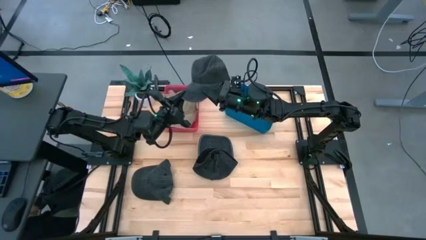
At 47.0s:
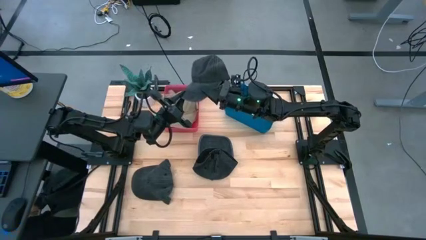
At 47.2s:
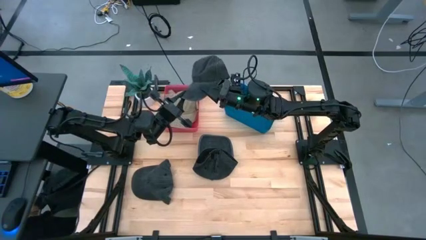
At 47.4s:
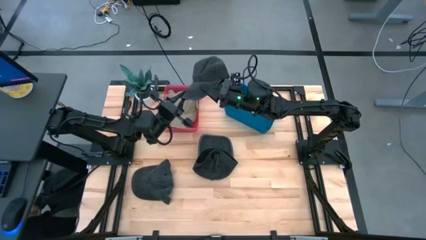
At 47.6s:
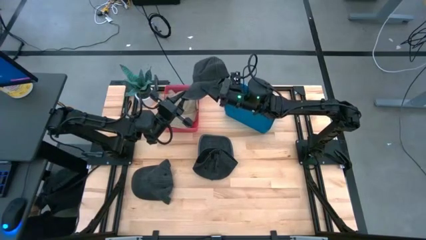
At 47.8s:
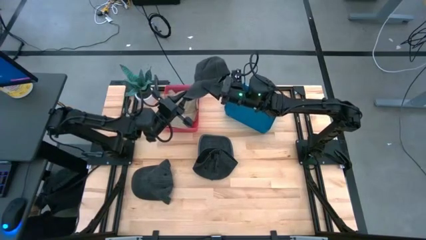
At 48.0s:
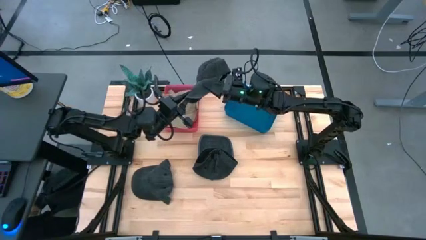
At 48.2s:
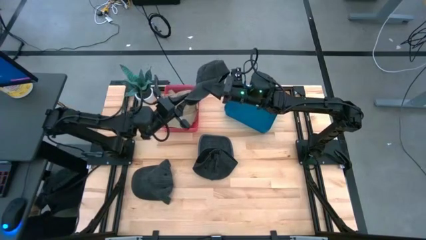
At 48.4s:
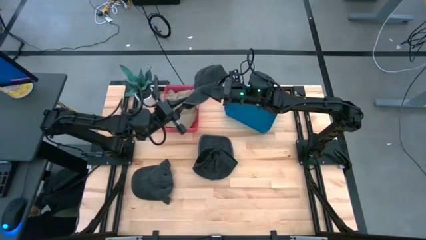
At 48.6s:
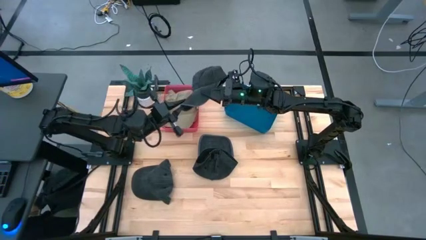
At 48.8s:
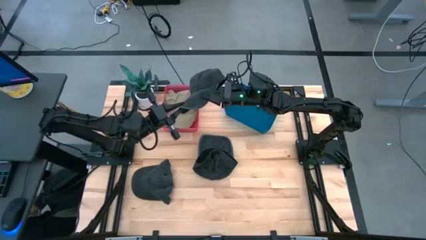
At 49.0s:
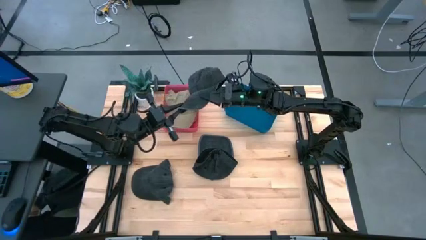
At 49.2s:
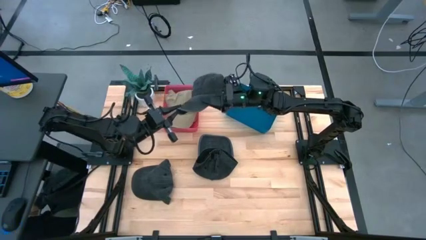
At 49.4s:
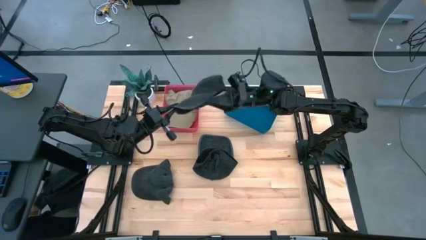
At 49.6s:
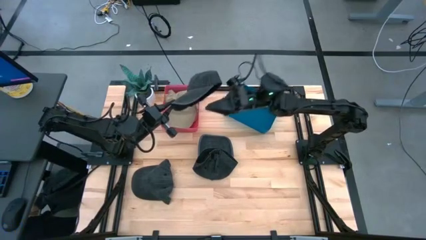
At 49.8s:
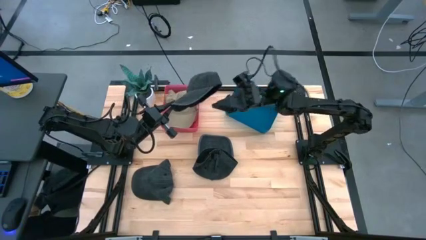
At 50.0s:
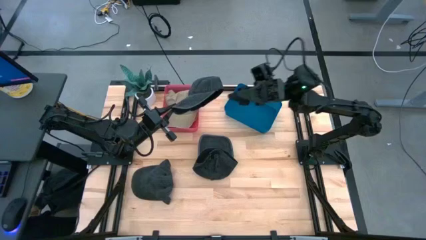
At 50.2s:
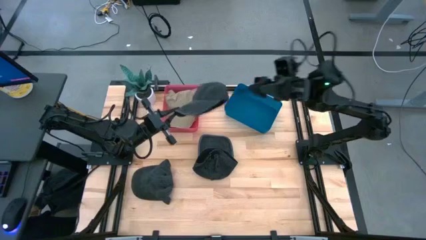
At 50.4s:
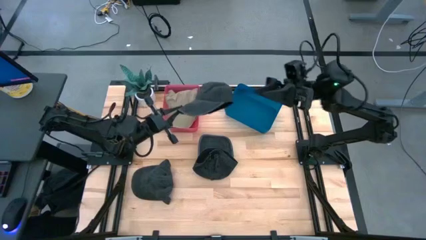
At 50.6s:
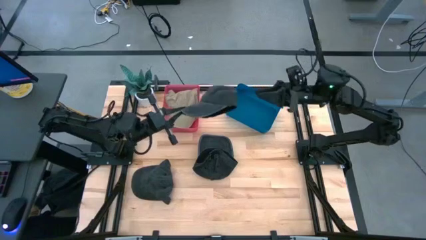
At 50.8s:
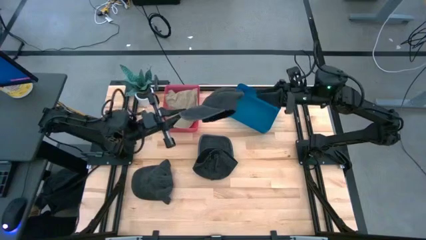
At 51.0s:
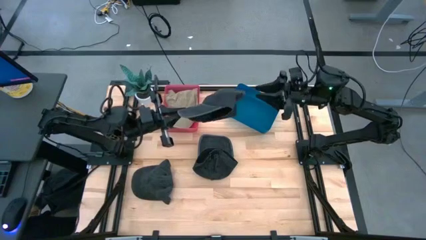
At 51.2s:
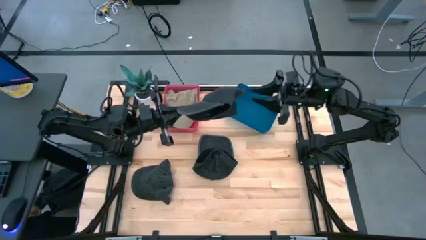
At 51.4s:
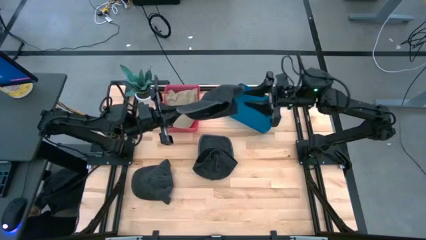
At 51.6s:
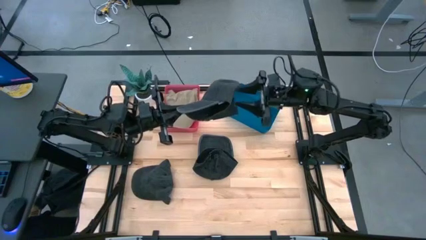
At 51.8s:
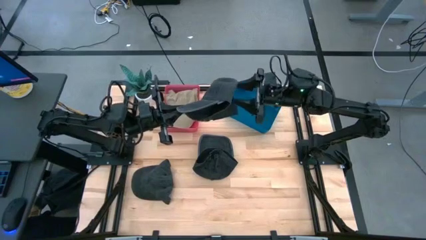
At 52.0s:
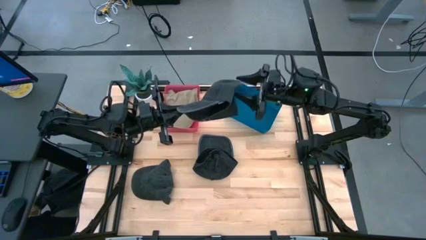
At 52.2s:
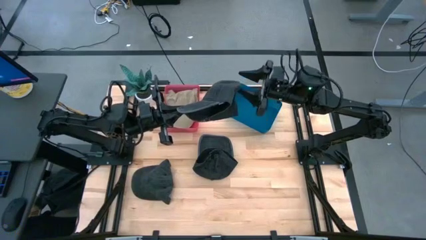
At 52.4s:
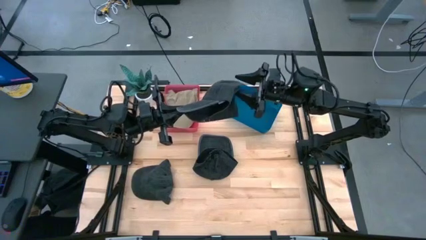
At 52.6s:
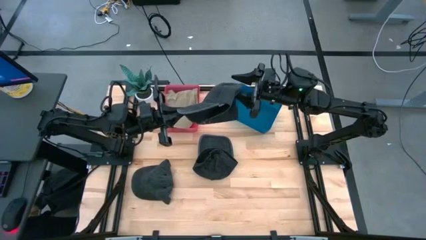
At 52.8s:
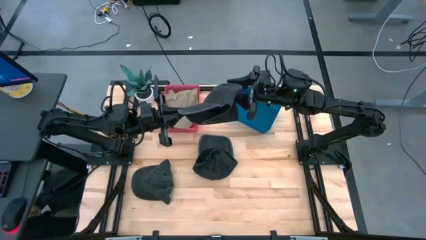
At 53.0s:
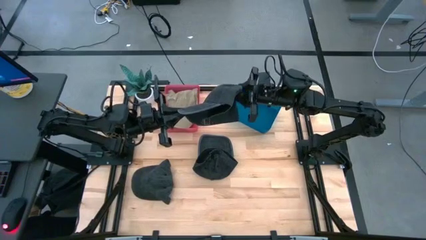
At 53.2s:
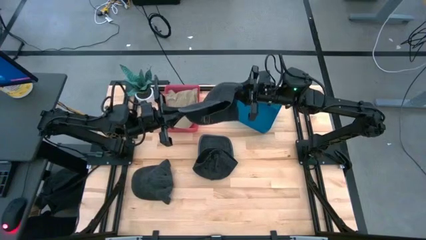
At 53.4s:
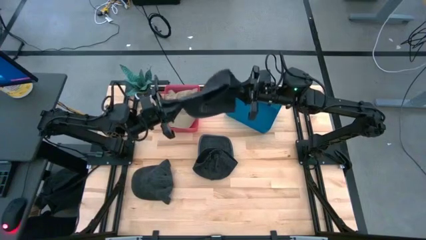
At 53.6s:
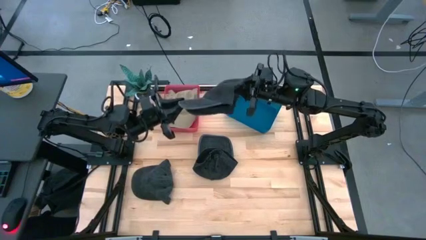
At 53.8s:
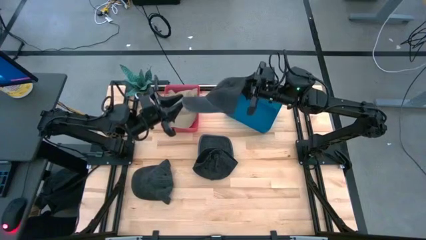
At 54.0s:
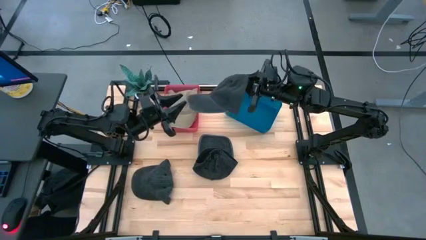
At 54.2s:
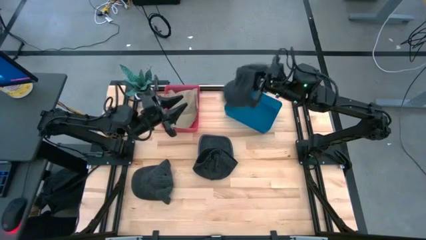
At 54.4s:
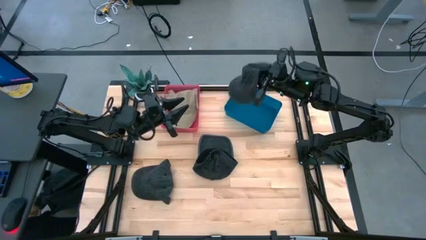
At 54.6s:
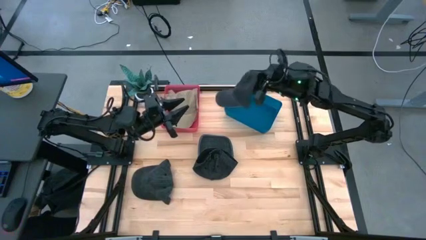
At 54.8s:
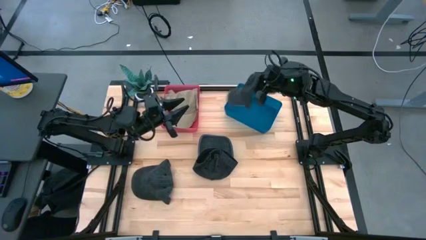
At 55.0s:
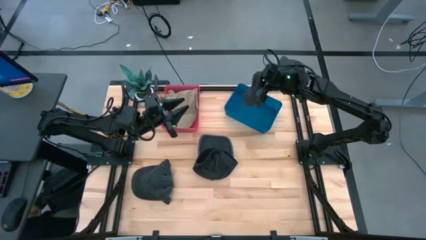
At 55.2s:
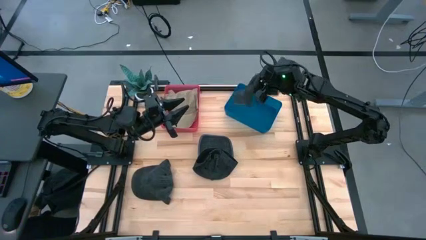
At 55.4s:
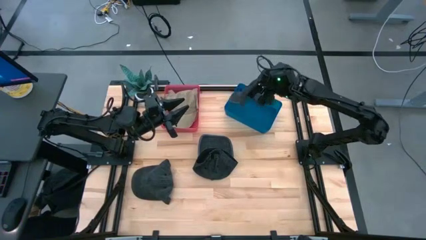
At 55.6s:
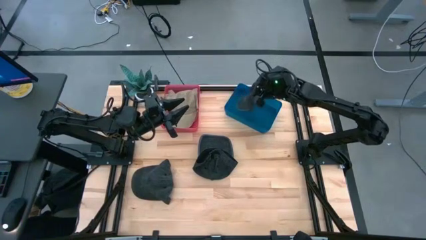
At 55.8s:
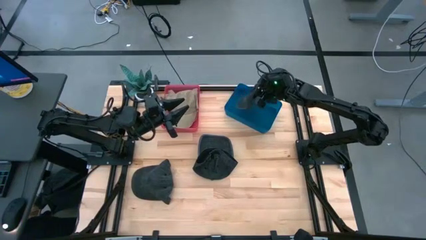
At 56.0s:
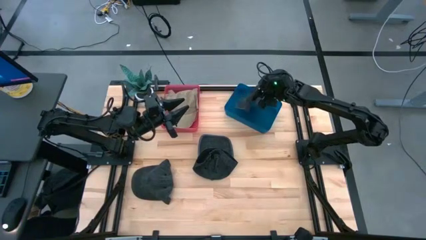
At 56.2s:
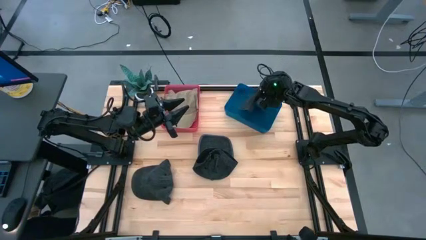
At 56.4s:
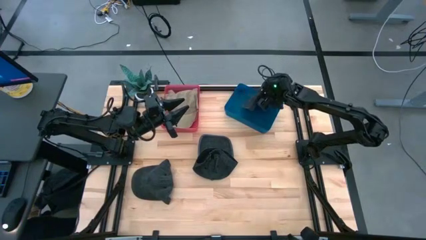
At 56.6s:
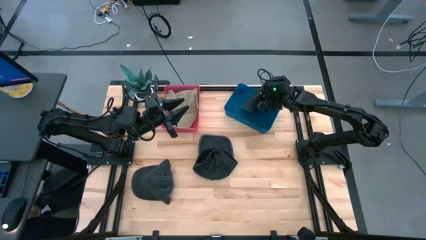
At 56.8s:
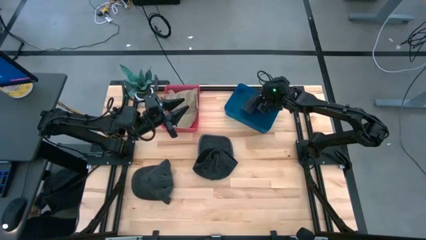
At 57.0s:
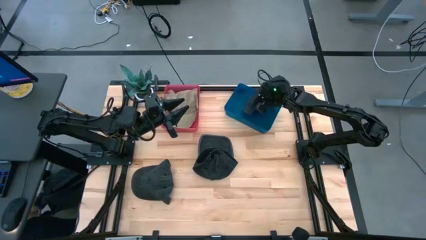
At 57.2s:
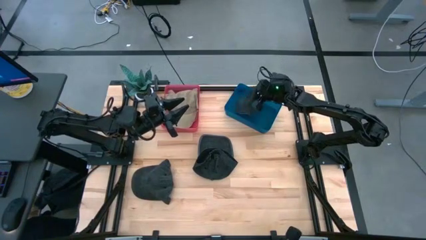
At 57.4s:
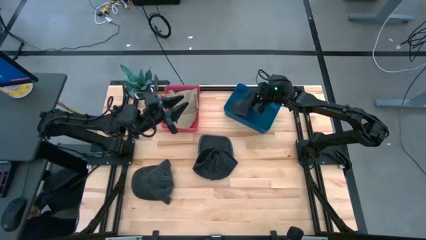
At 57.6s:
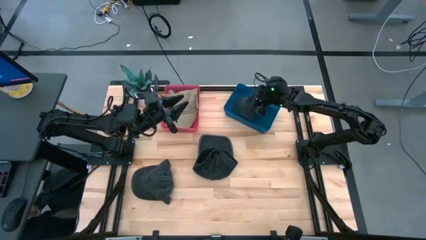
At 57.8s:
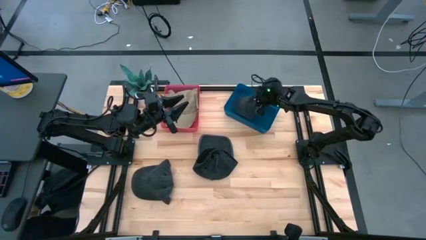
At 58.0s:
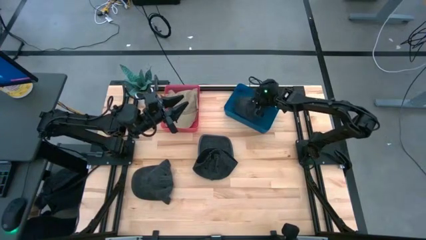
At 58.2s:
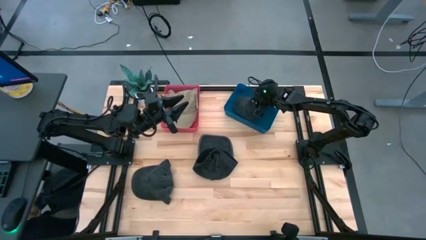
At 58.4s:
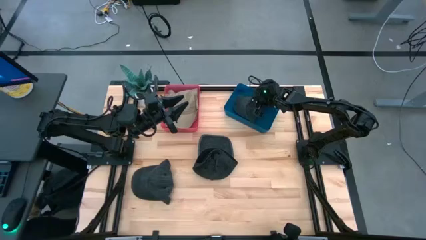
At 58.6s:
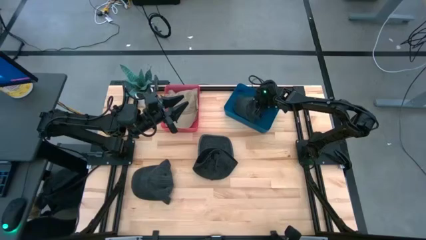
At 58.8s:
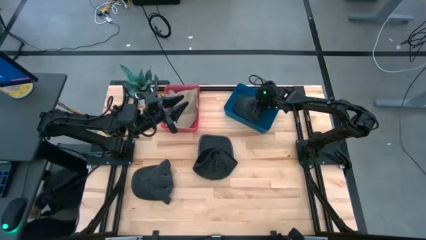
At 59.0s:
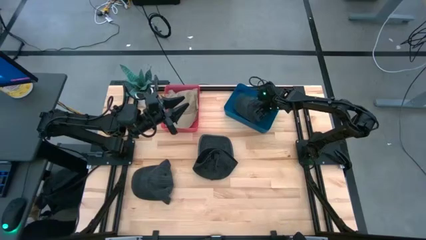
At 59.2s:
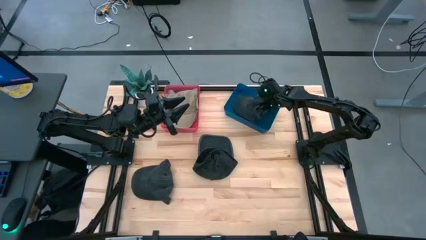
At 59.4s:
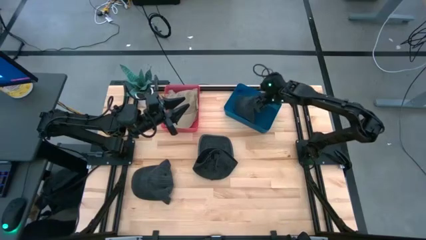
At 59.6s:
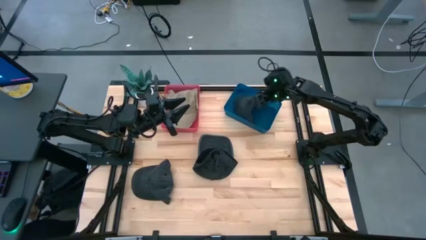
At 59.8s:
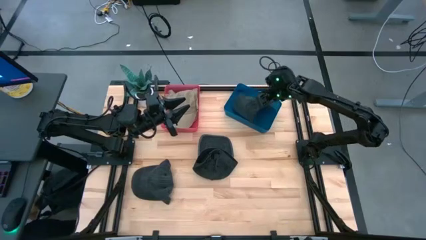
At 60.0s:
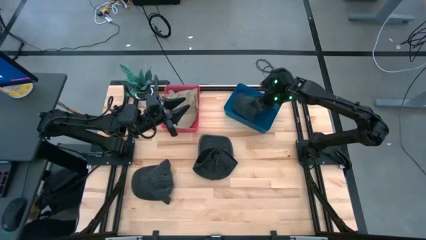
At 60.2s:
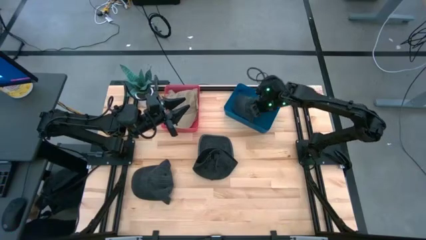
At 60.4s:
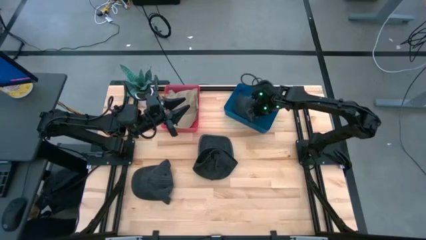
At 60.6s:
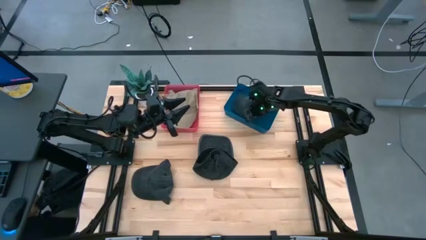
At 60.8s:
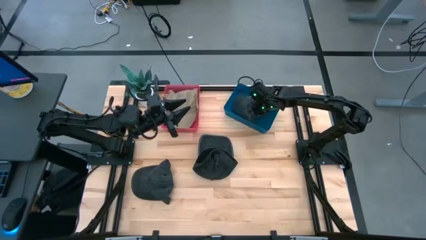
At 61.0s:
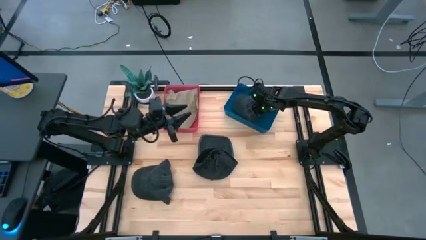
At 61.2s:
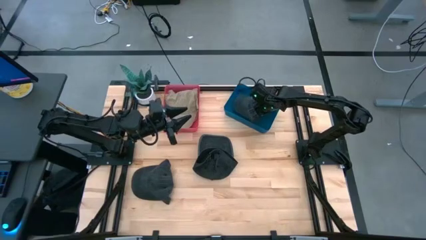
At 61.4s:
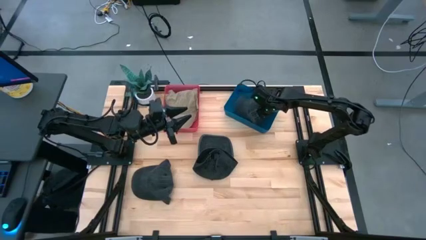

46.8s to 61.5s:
Task: Pick & Place hat
Put the right black cap into the blue bin

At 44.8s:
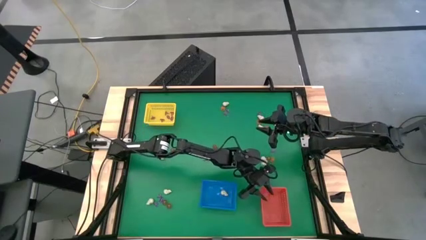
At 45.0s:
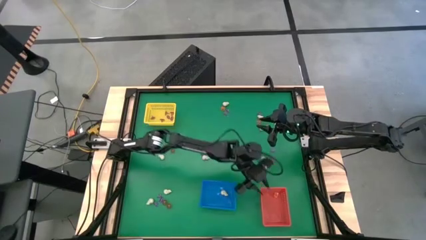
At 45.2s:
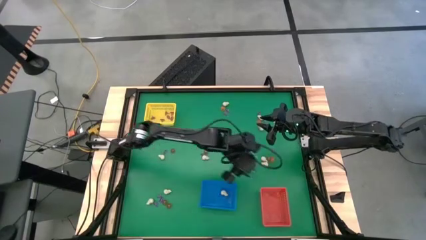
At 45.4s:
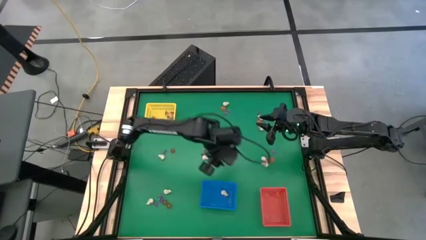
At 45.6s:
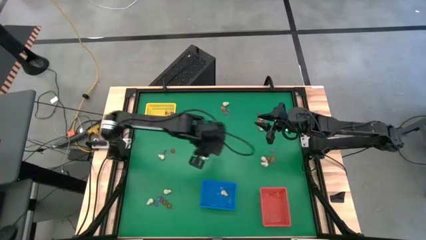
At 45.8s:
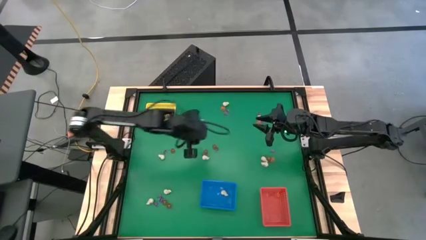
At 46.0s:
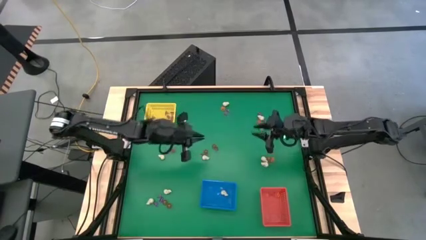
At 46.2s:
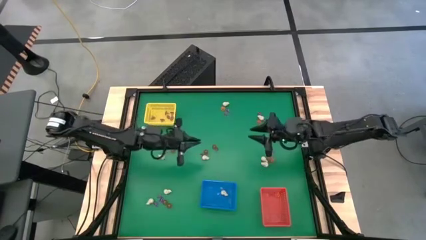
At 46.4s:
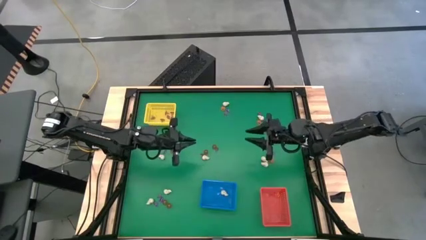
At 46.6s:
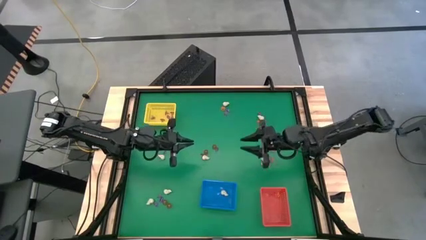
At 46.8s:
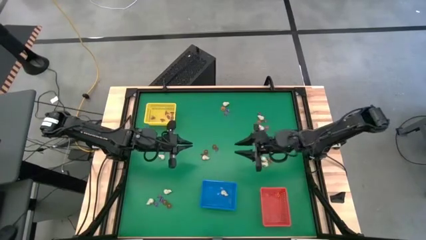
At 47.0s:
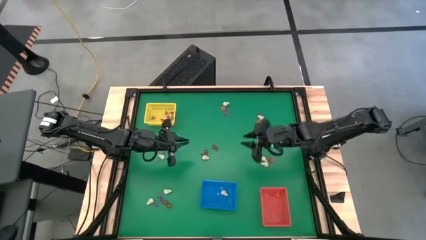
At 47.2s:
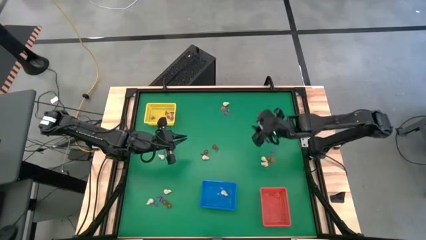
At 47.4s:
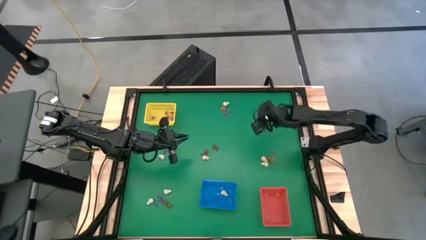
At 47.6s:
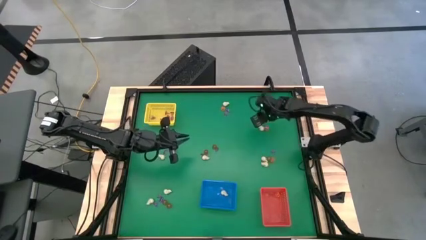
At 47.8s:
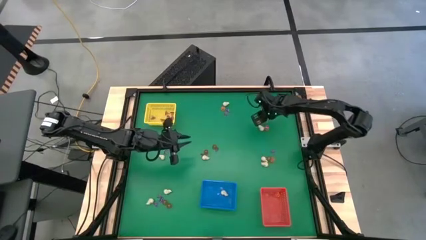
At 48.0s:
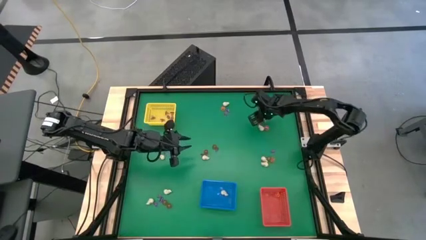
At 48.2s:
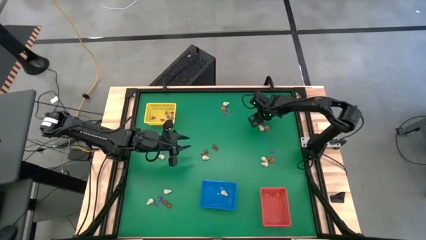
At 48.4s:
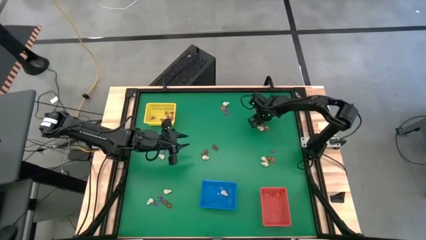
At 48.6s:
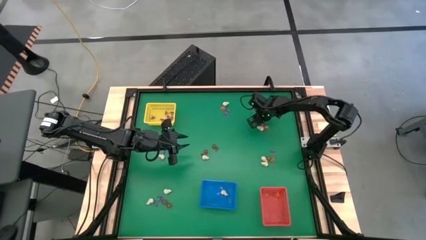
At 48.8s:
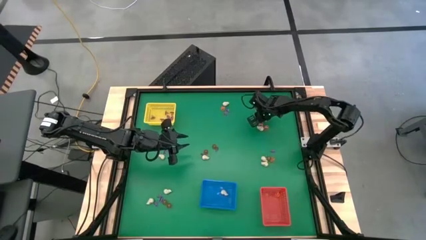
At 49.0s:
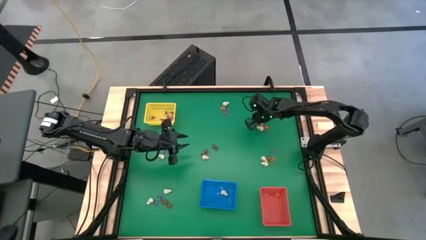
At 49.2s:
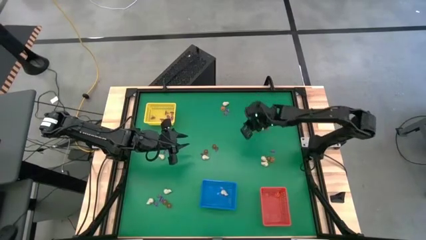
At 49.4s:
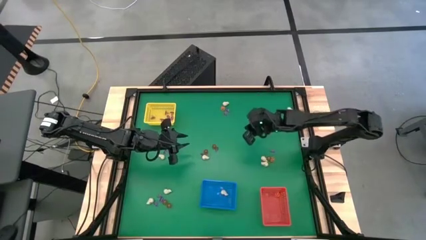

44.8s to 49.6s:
Task: Sort Halloween decoration
Put the white skull toy into the blue basket
